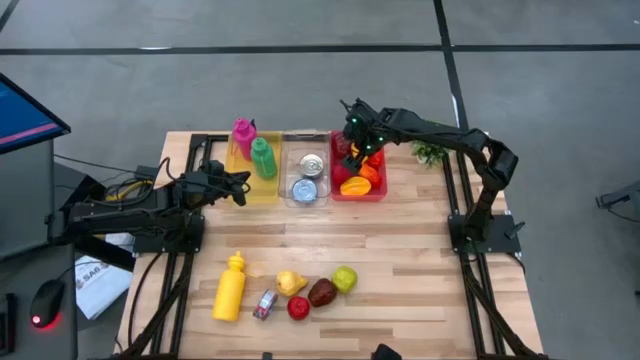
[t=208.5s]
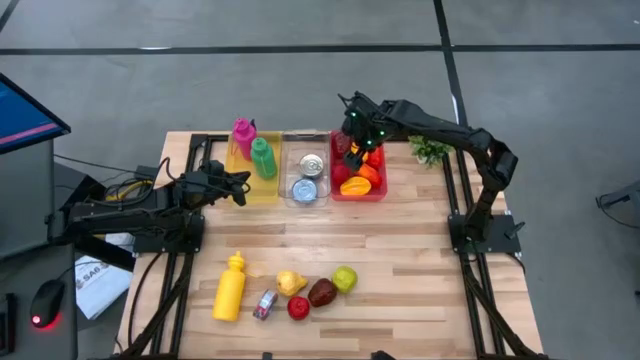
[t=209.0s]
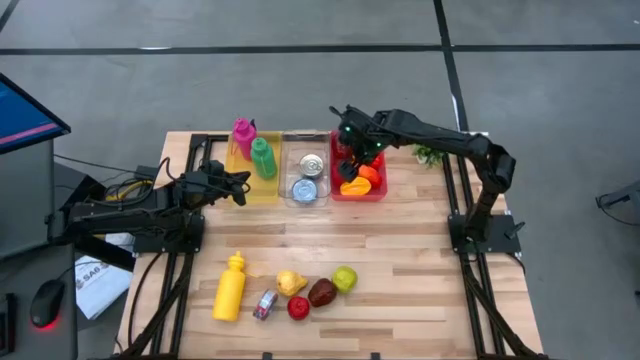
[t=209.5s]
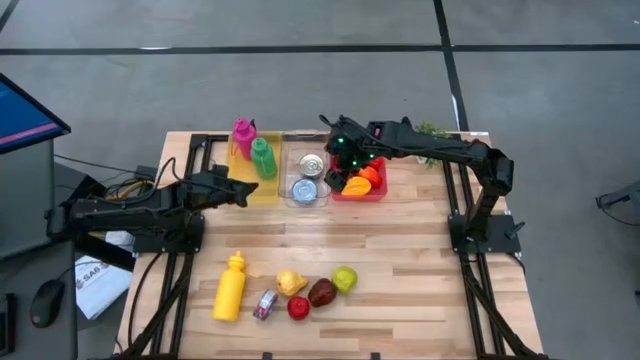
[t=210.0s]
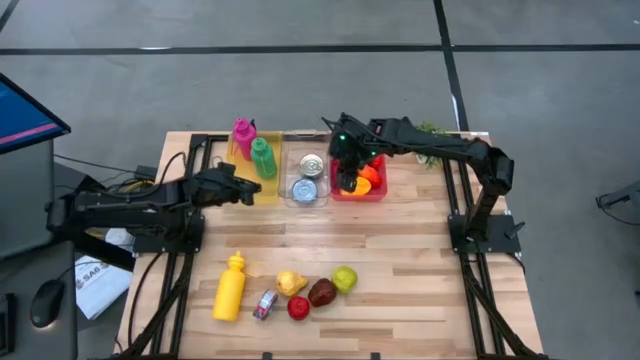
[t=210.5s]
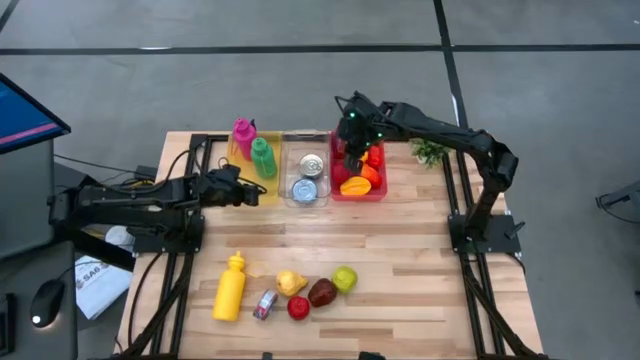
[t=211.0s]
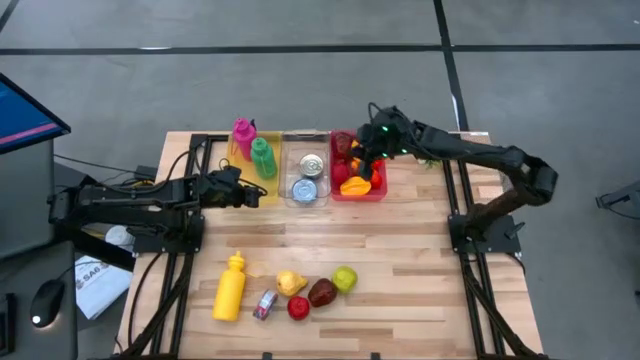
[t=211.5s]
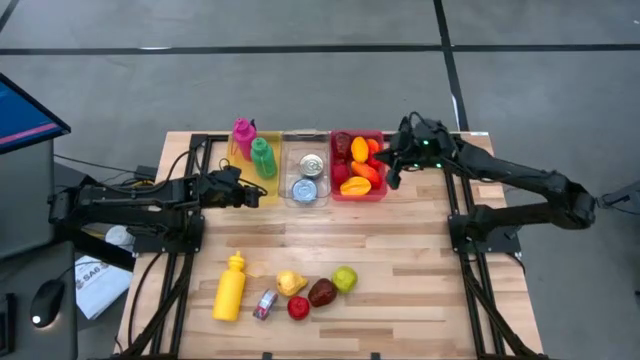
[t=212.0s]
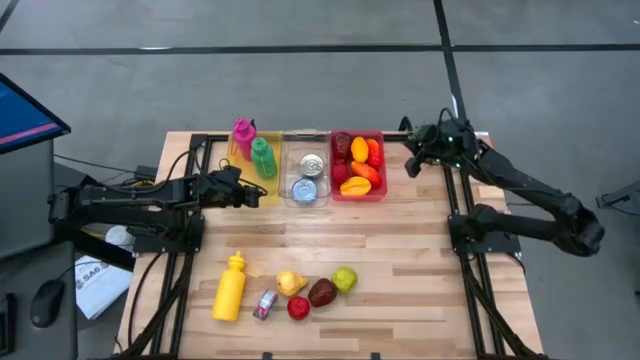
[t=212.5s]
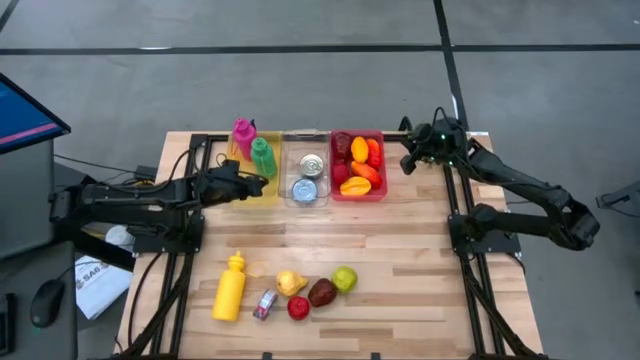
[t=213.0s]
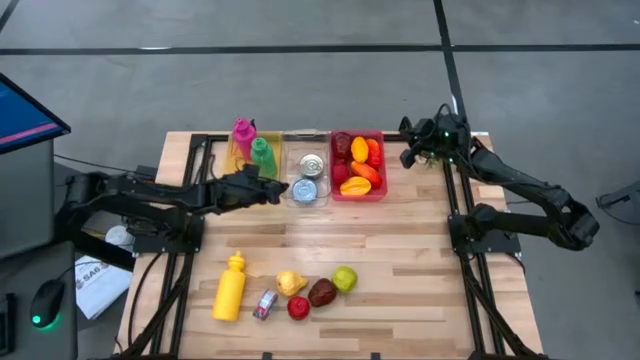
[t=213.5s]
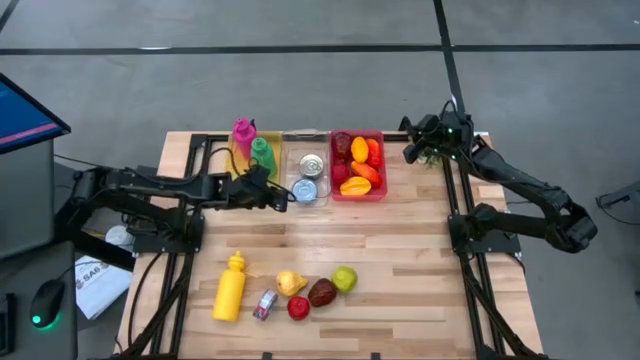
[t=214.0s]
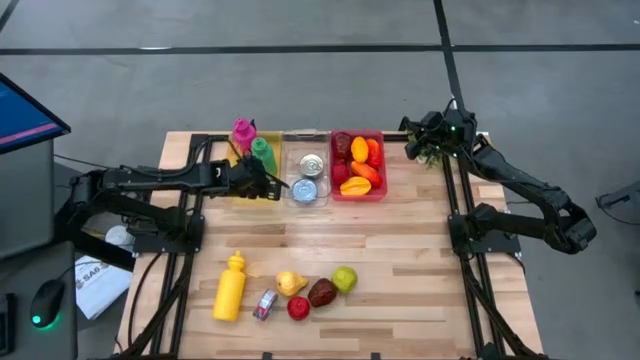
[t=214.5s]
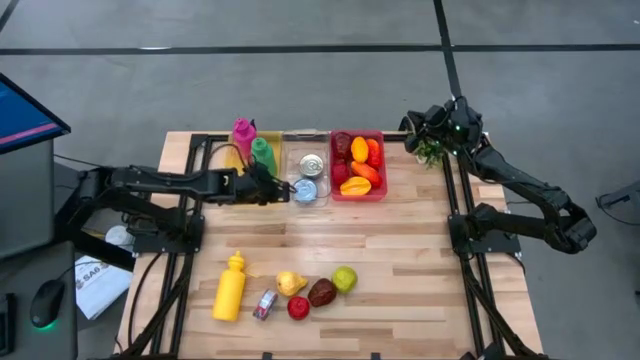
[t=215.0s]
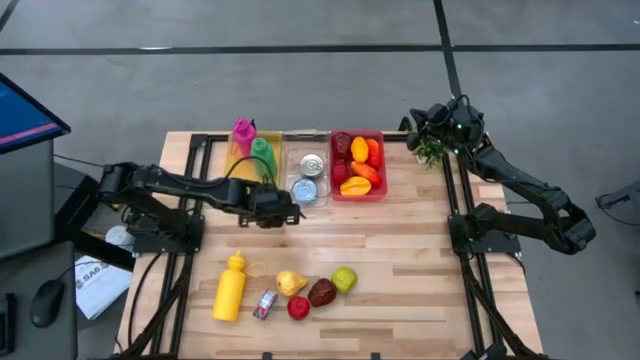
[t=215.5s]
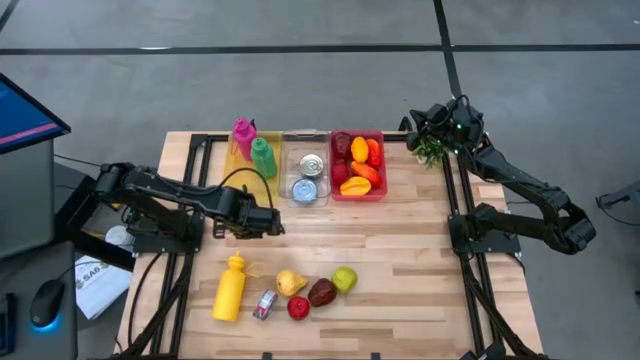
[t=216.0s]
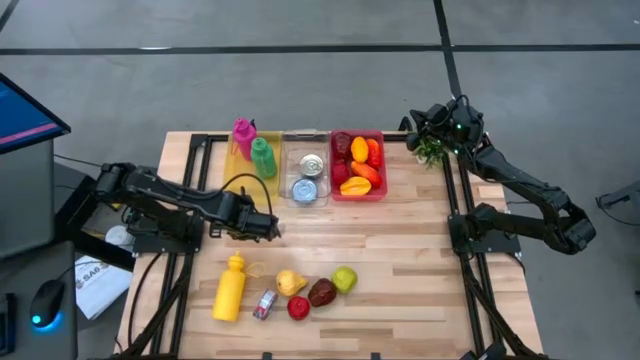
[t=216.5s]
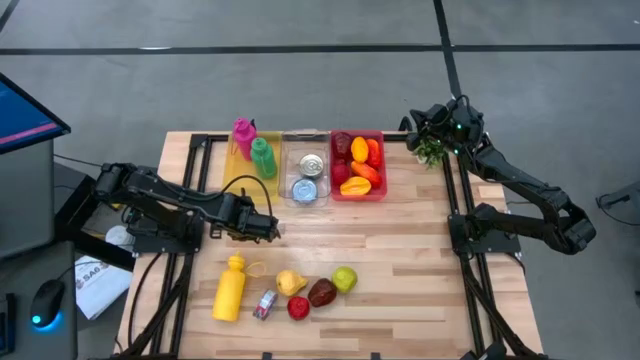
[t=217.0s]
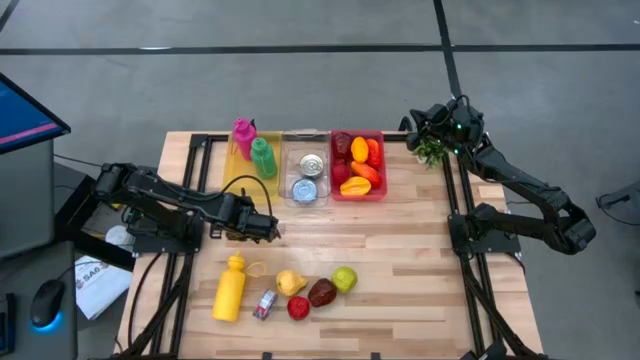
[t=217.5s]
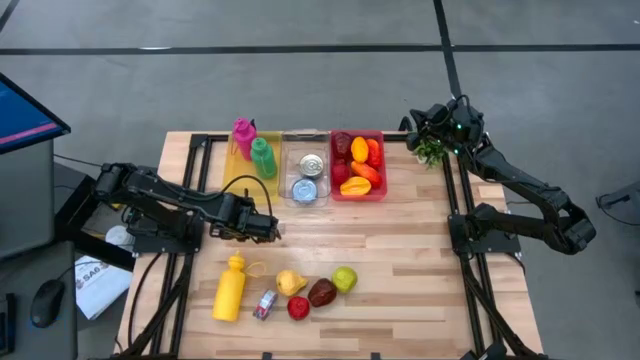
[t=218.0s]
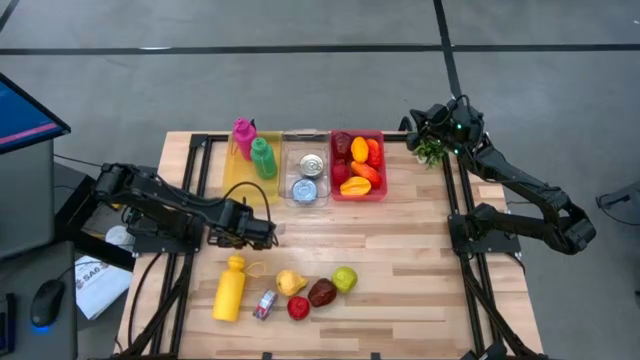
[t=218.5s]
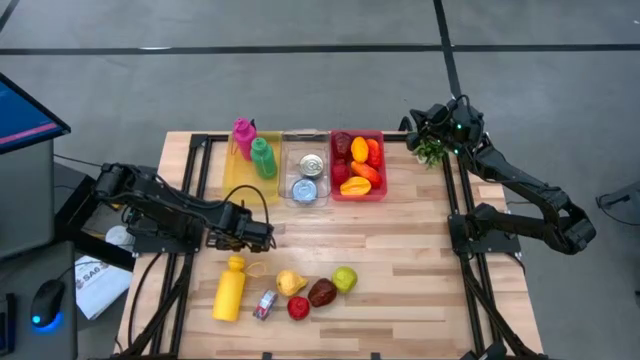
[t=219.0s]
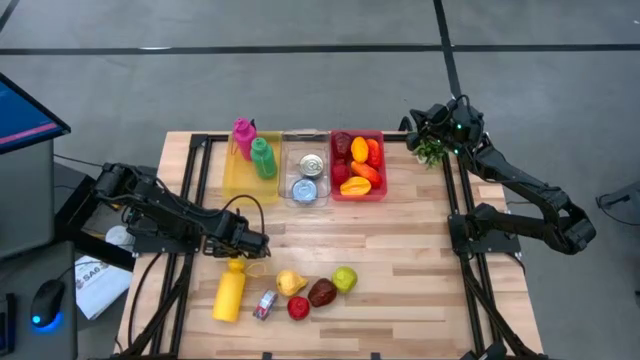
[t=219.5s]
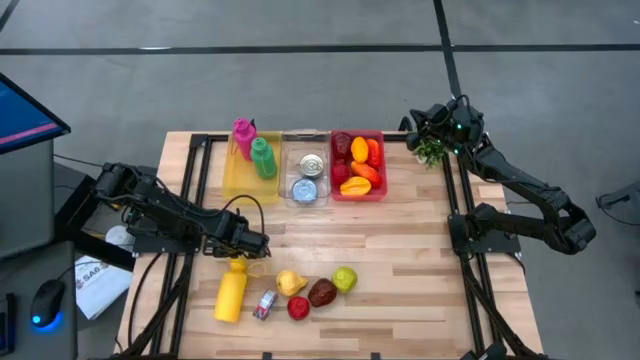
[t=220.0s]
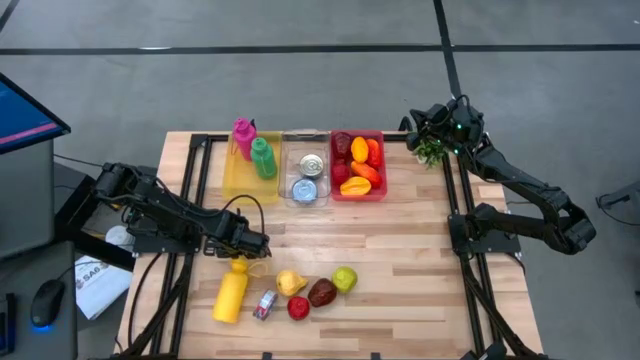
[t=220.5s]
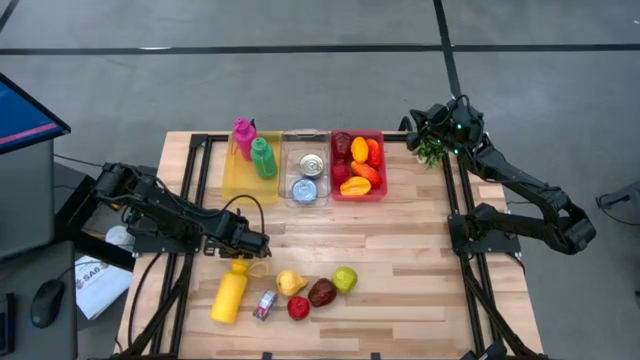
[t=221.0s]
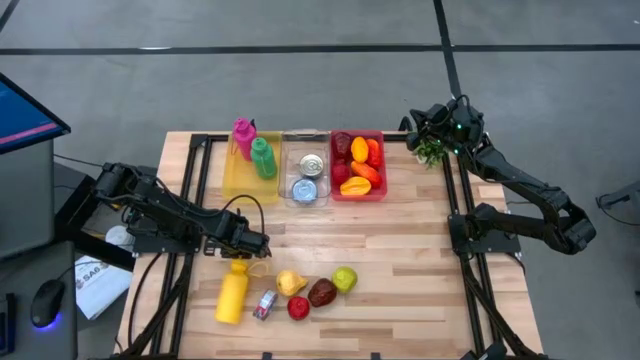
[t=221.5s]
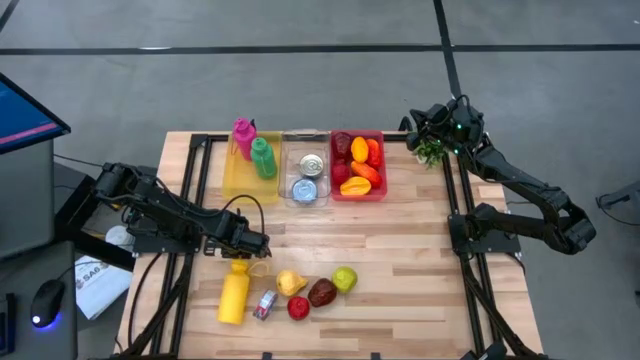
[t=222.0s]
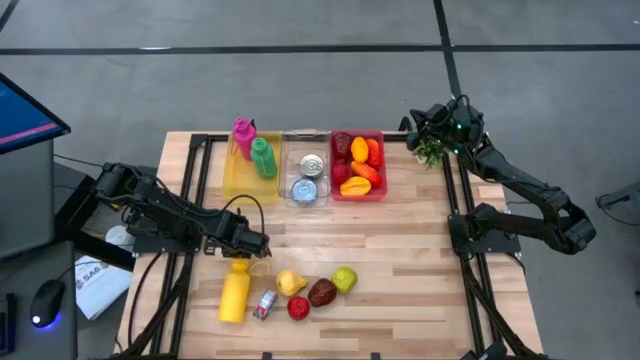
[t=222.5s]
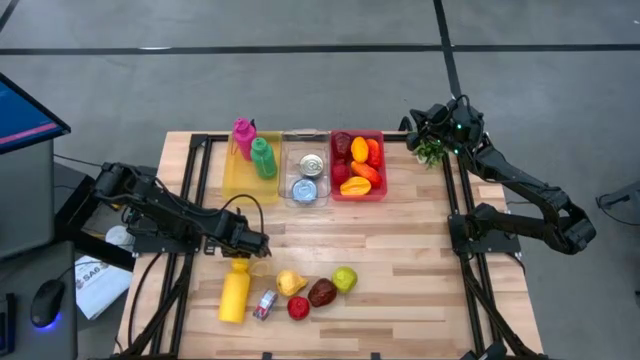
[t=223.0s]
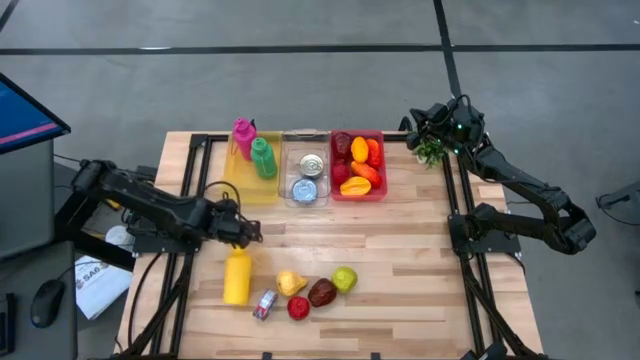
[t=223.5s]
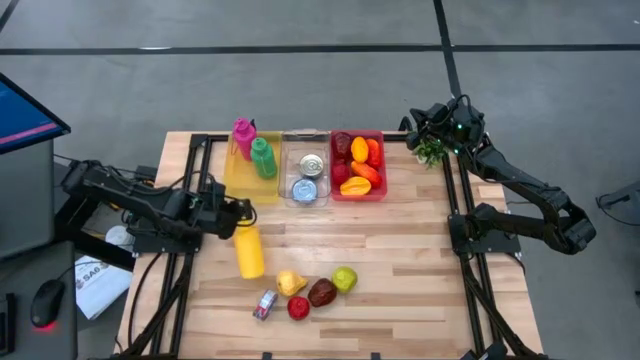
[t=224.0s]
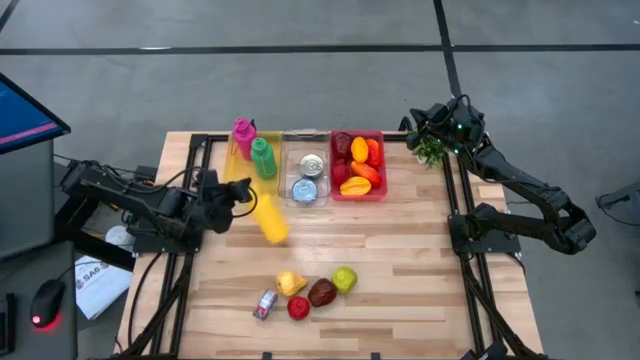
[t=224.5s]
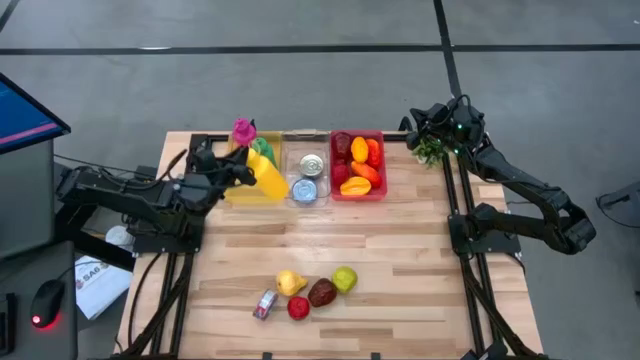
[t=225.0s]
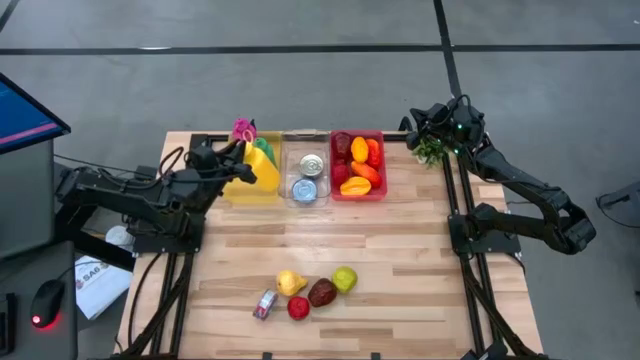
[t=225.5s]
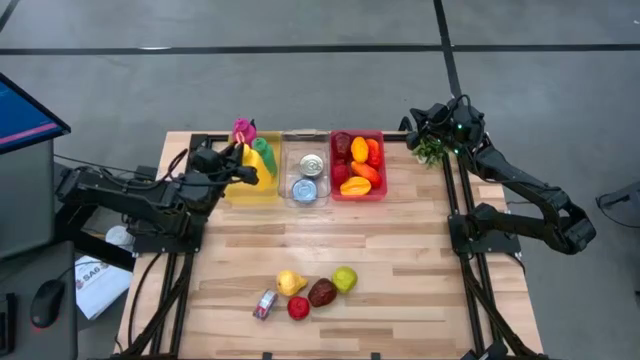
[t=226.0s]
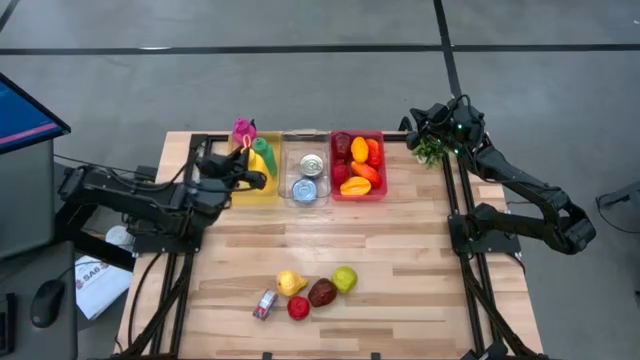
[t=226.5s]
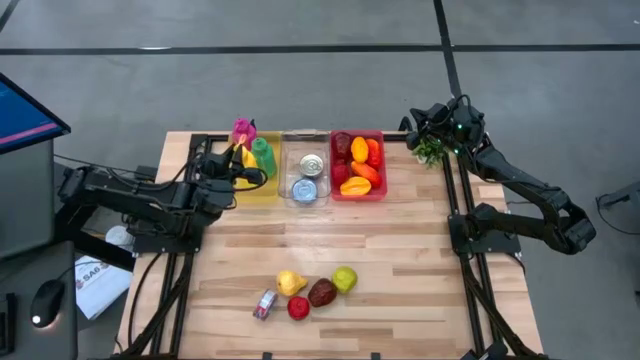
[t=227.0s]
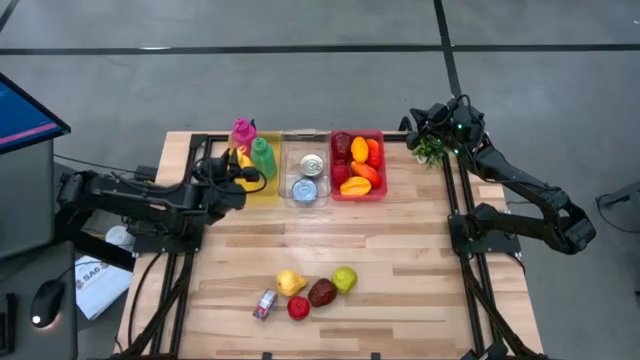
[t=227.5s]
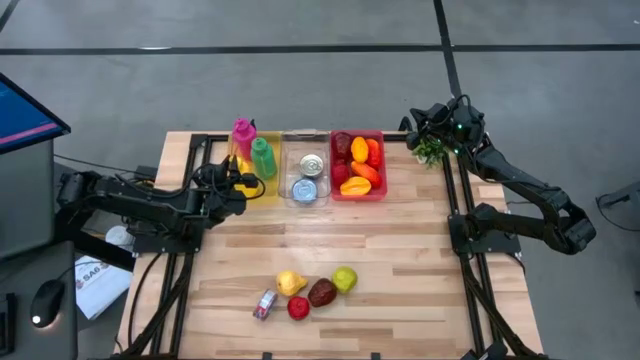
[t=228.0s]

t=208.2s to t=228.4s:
Task: Pick & Place Food Item
Put the yellow tumbler into the yellow bin

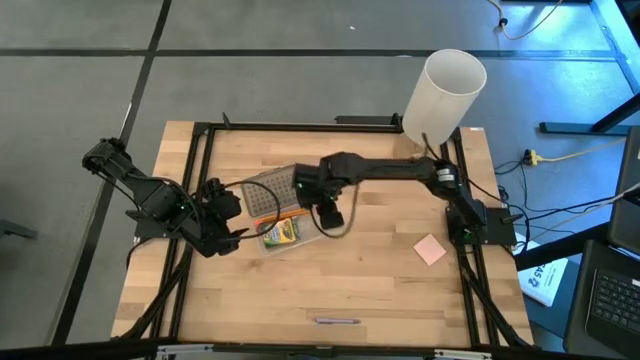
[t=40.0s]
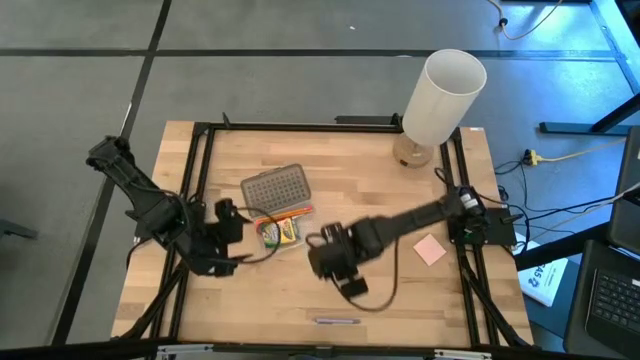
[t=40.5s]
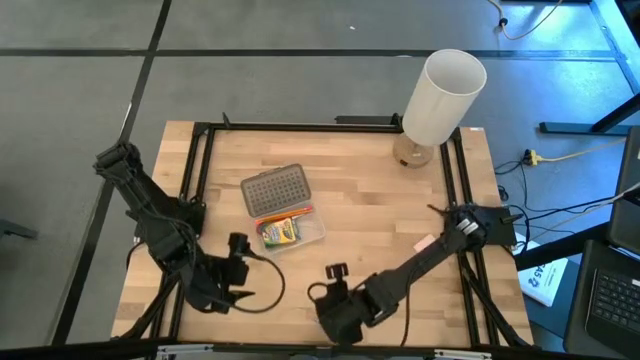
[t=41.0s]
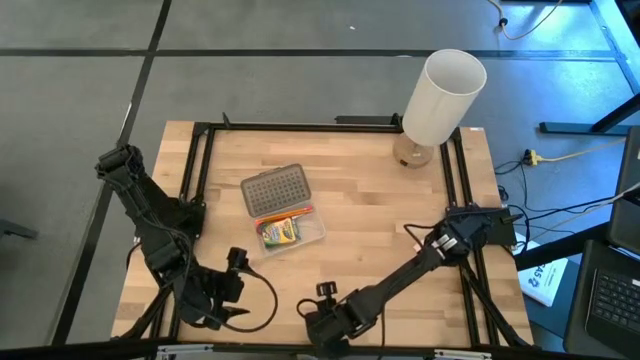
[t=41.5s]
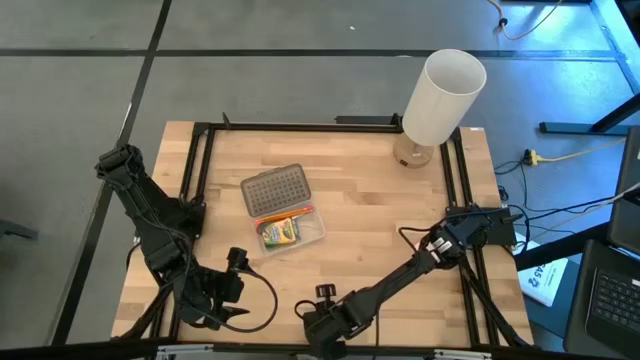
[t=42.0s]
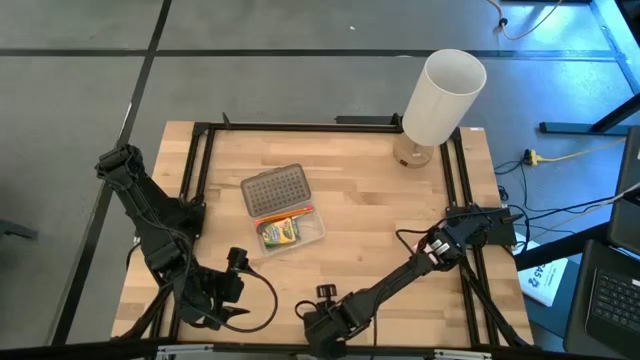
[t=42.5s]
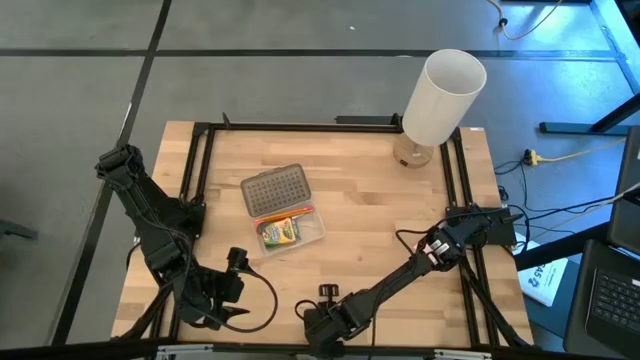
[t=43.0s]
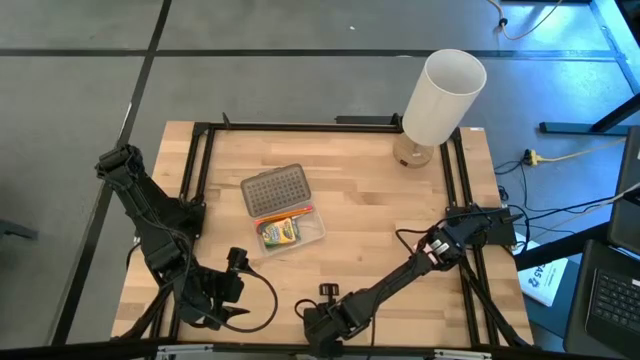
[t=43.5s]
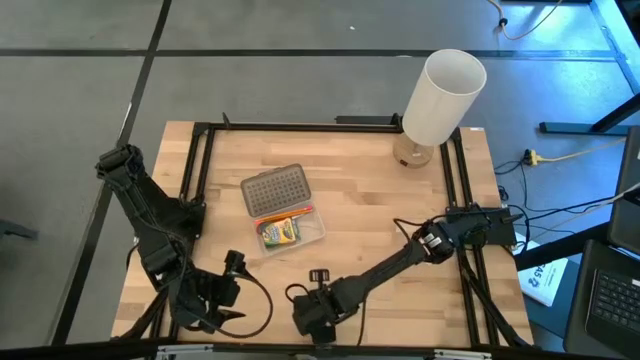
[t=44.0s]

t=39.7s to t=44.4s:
Task: Pack school essentials
Put the purple pen into the transparent supply box
